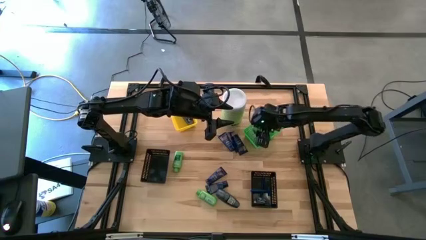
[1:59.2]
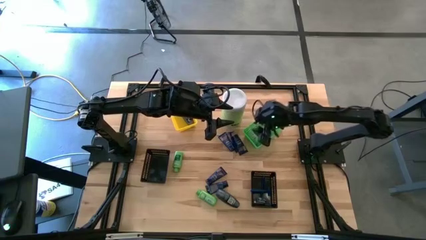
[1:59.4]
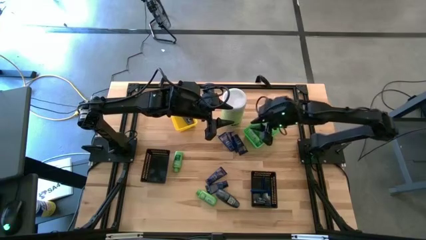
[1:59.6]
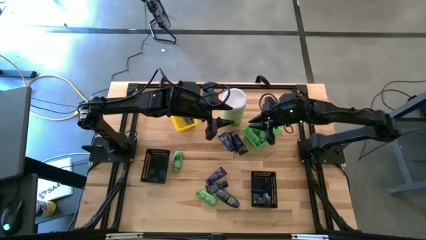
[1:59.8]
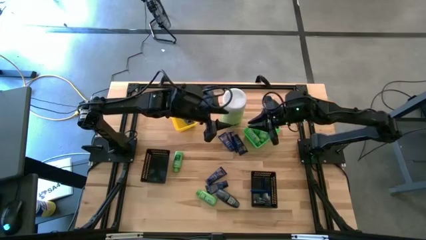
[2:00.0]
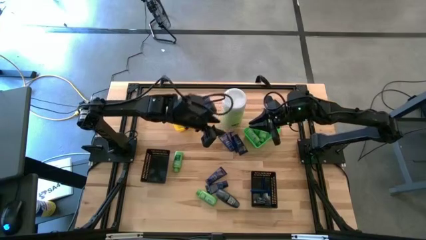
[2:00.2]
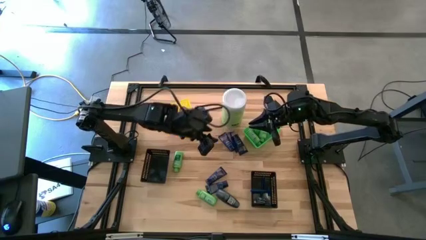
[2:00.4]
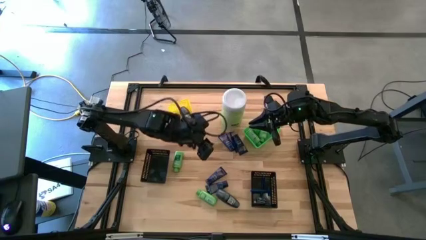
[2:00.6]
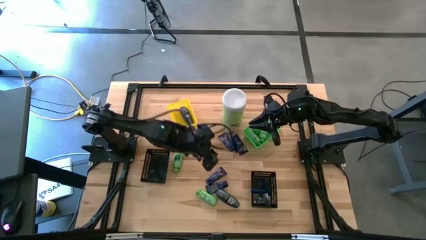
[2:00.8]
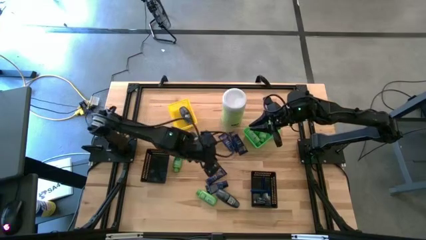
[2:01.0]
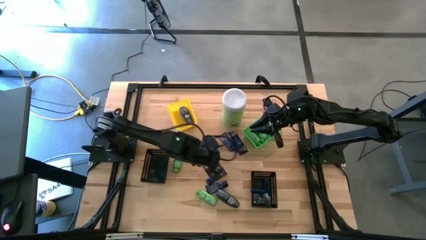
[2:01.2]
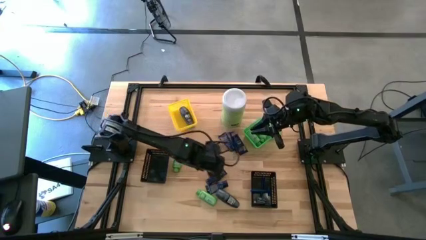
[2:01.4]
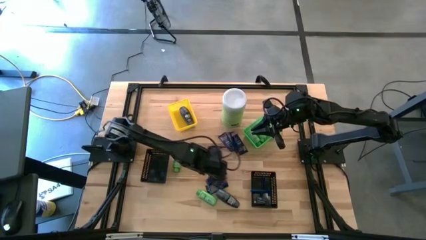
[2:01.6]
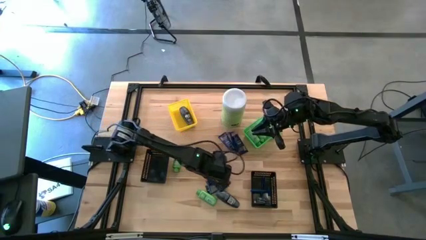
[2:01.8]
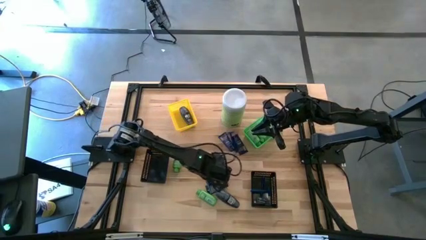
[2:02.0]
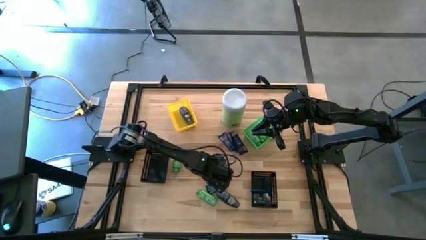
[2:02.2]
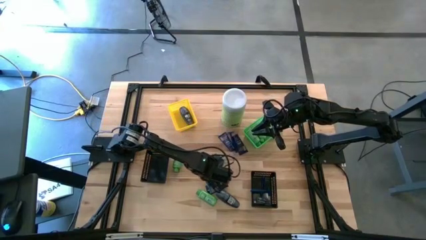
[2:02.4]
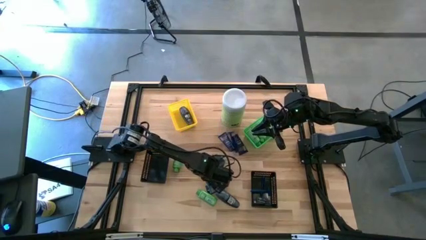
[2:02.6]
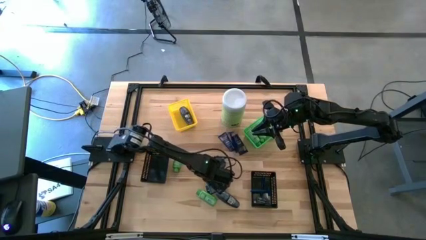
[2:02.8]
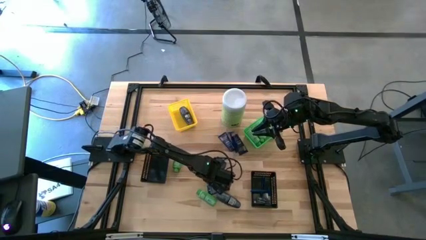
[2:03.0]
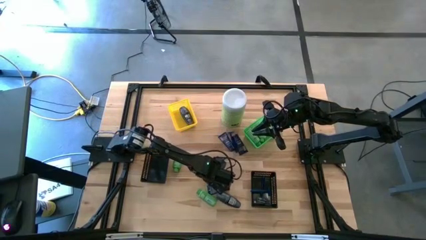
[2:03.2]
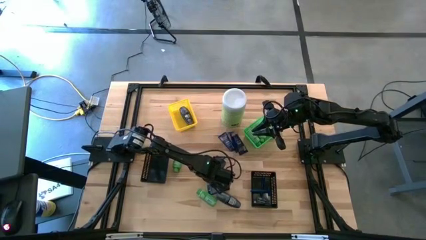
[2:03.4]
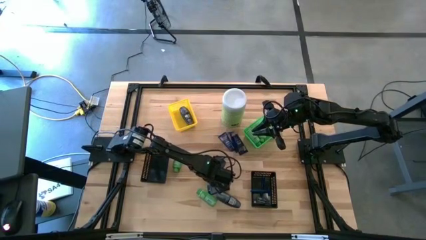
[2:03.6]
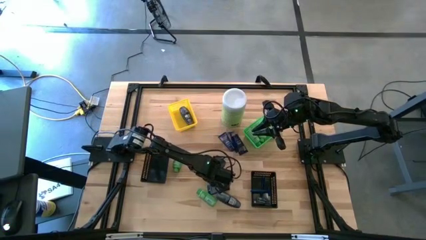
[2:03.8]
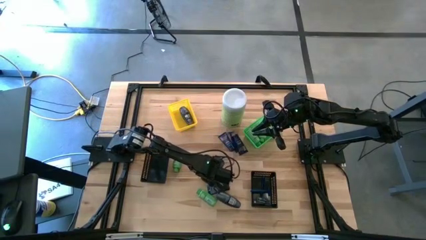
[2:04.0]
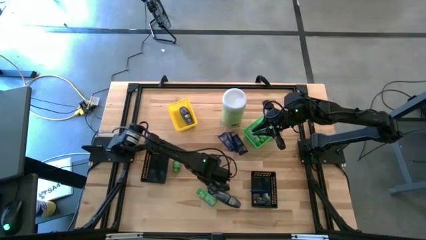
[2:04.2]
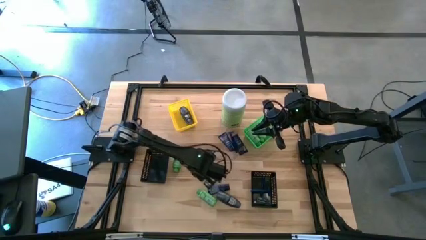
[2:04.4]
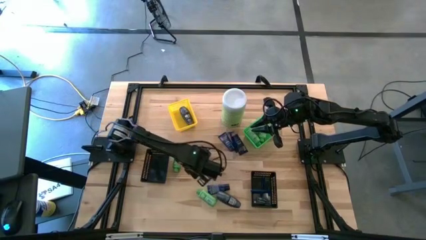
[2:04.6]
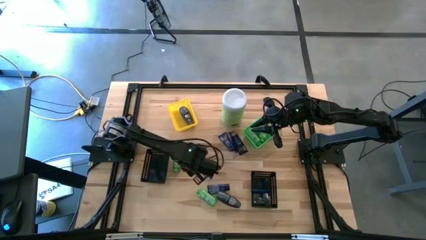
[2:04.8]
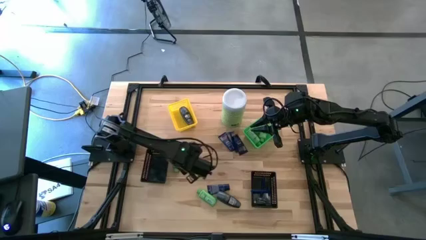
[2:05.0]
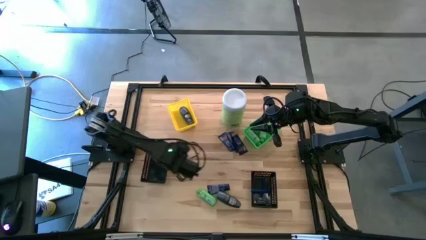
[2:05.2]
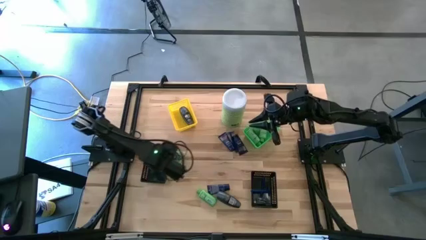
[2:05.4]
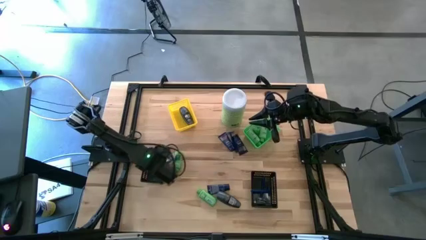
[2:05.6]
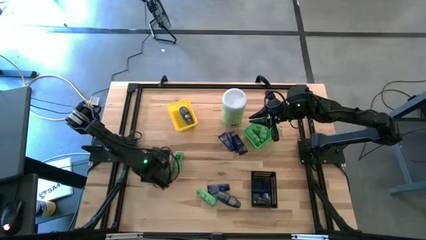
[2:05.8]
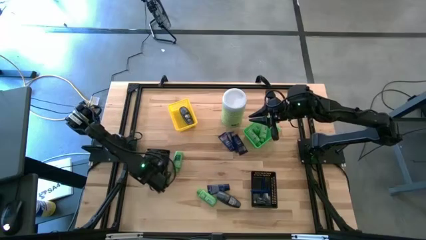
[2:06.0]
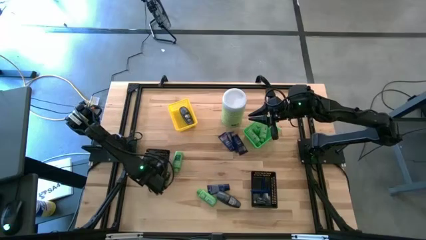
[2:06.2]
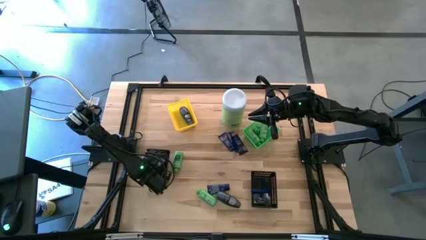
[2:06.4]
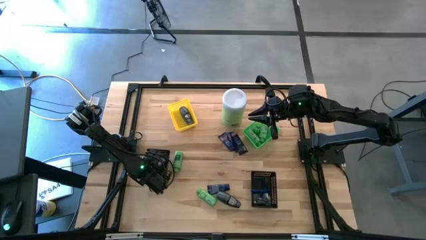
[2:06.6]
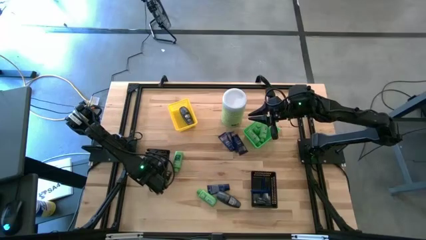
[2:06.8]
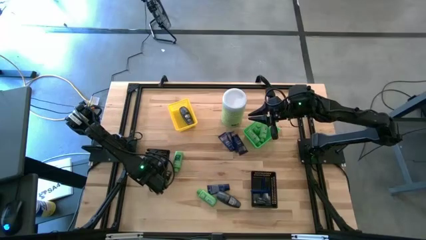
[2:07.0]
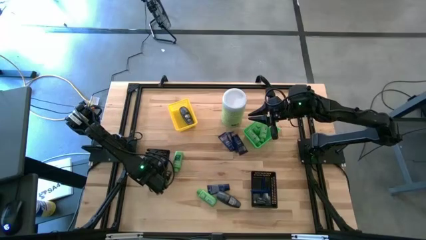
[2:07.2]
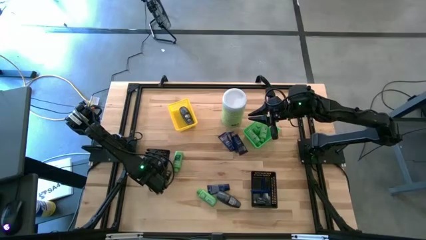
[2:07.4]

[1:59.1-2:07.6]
Task: Pick & Place Travel size toiletries
Put the shave cream into the left black bin

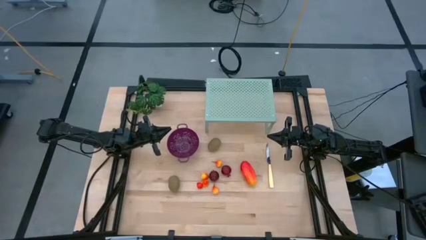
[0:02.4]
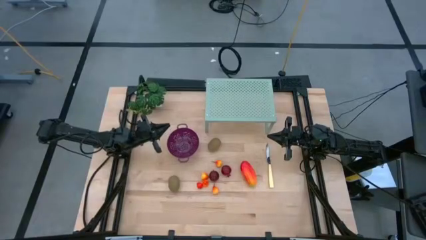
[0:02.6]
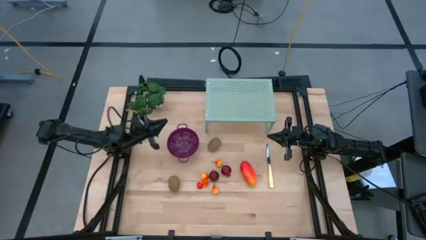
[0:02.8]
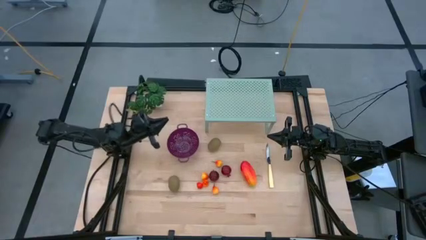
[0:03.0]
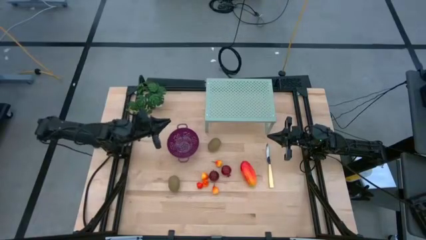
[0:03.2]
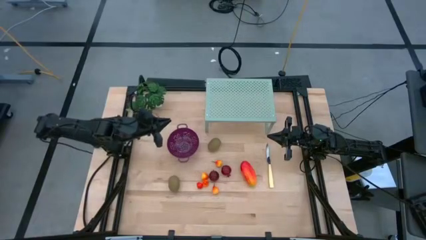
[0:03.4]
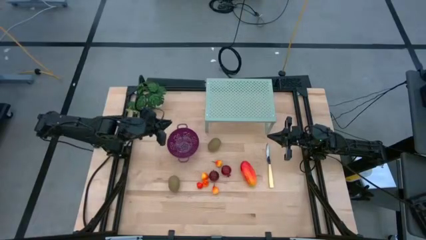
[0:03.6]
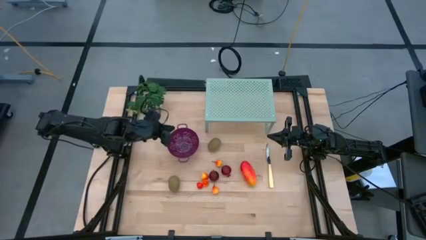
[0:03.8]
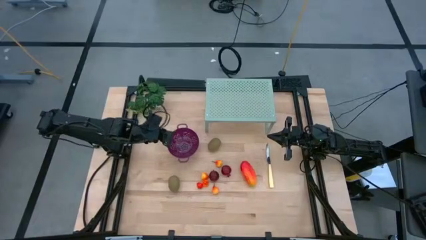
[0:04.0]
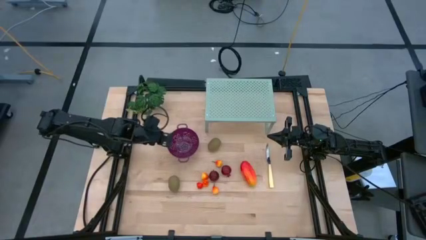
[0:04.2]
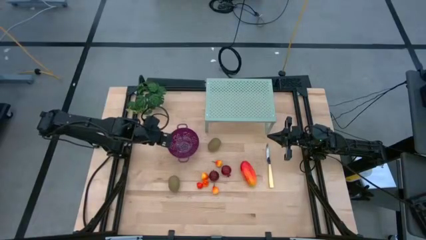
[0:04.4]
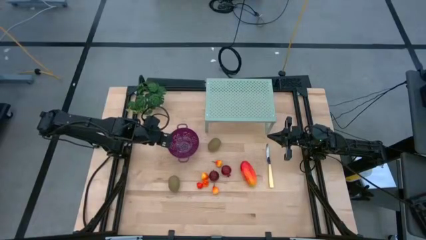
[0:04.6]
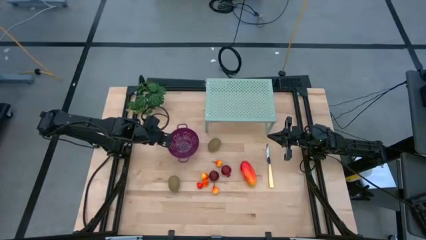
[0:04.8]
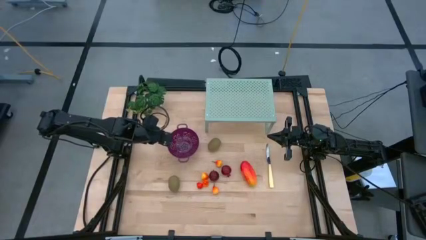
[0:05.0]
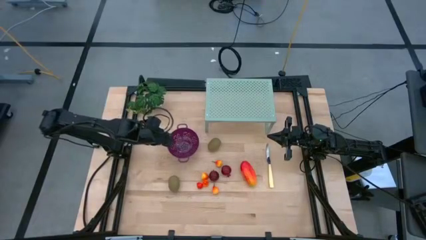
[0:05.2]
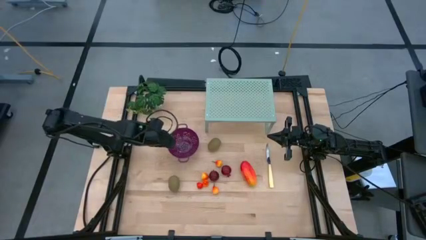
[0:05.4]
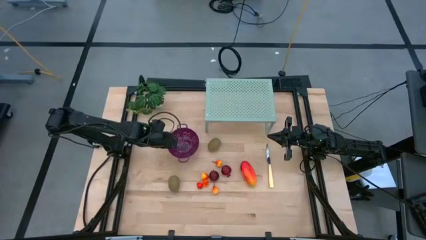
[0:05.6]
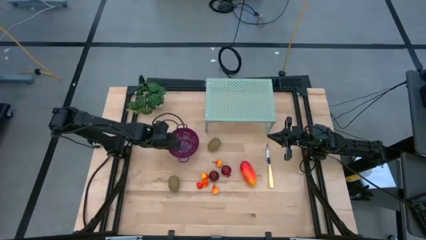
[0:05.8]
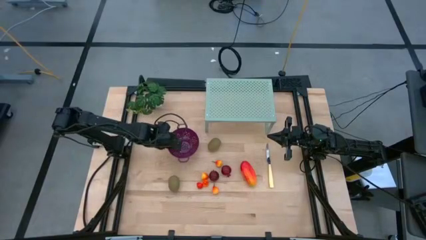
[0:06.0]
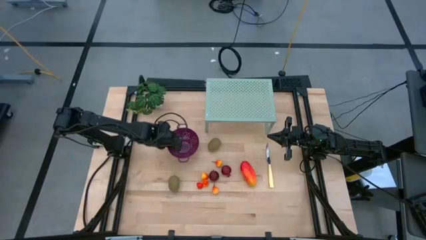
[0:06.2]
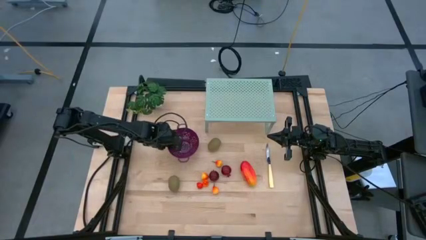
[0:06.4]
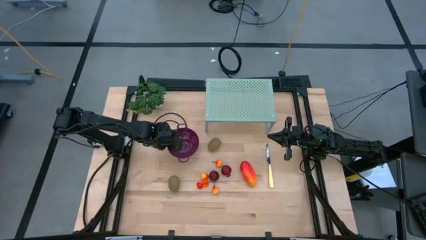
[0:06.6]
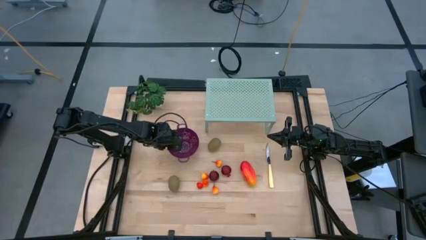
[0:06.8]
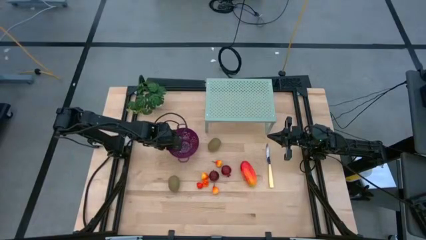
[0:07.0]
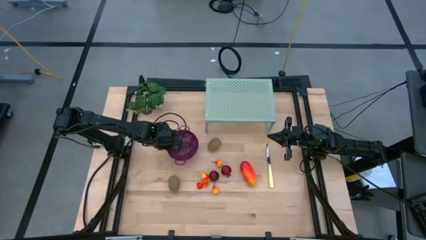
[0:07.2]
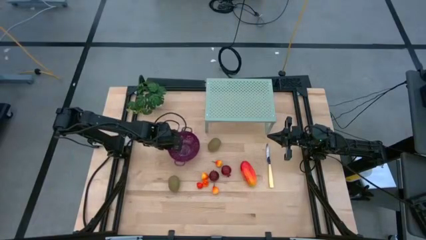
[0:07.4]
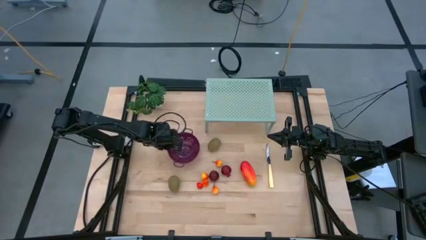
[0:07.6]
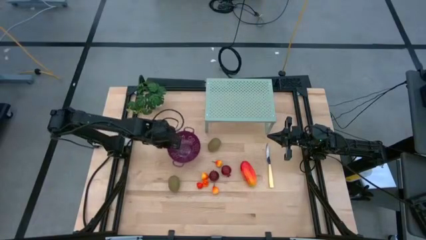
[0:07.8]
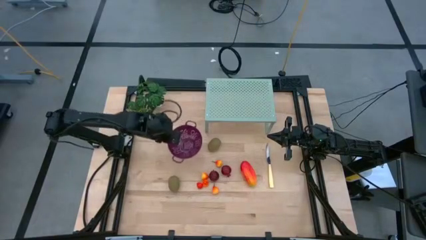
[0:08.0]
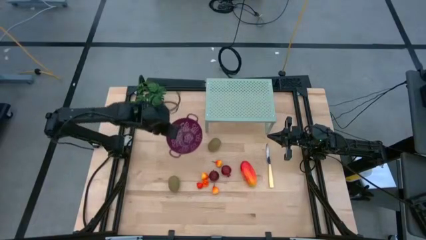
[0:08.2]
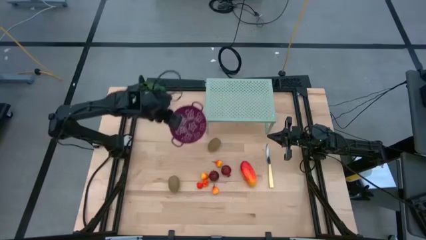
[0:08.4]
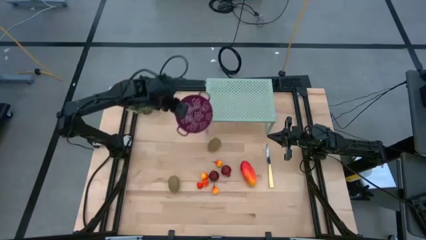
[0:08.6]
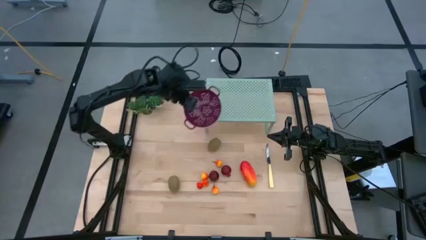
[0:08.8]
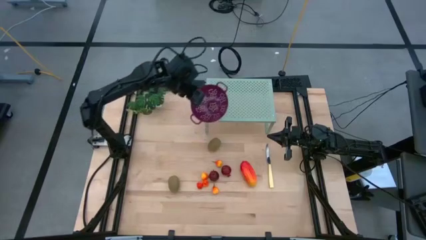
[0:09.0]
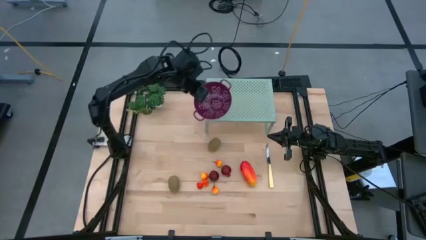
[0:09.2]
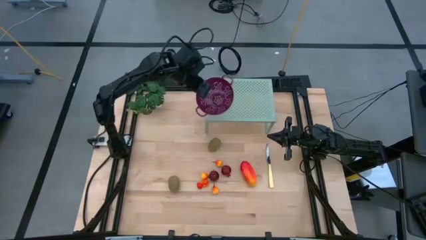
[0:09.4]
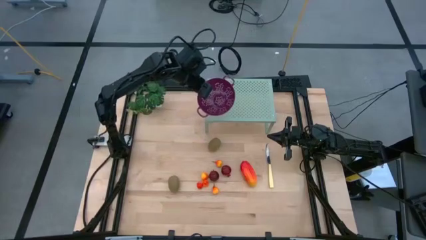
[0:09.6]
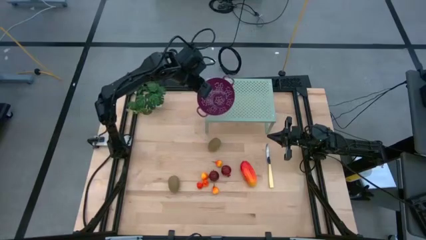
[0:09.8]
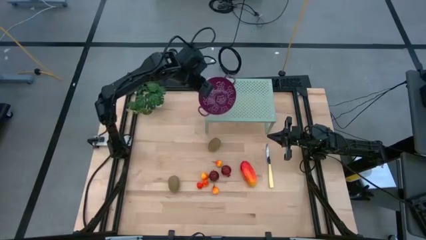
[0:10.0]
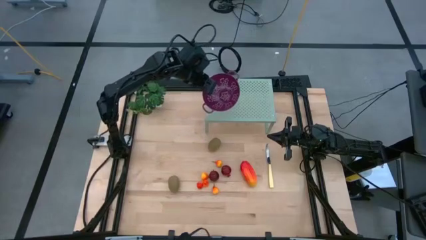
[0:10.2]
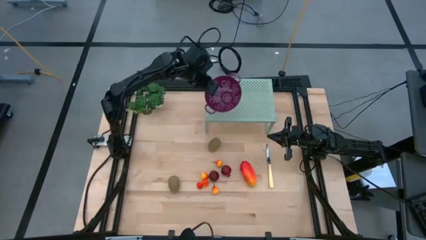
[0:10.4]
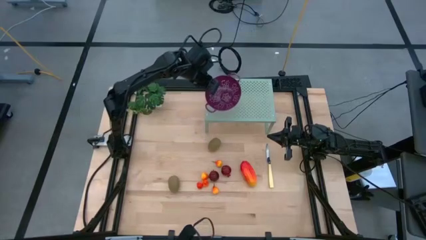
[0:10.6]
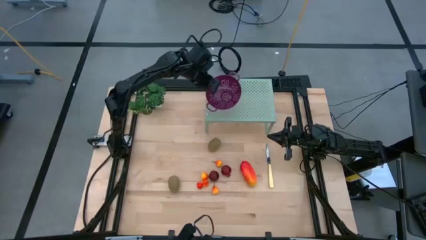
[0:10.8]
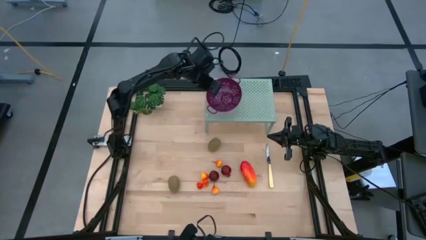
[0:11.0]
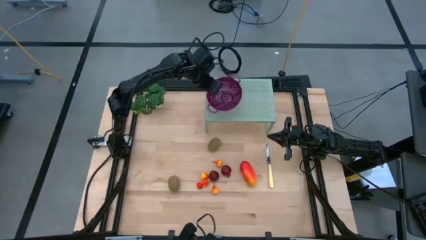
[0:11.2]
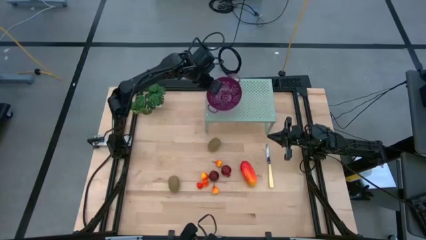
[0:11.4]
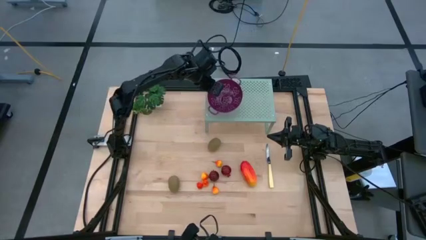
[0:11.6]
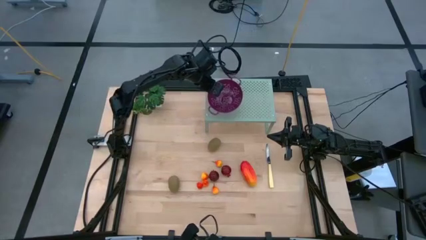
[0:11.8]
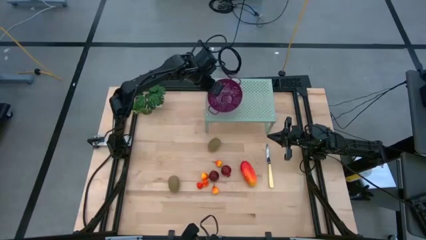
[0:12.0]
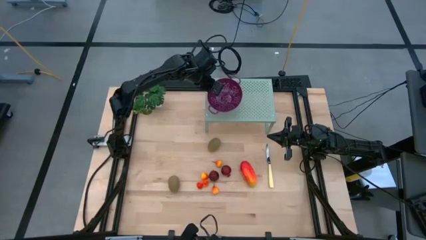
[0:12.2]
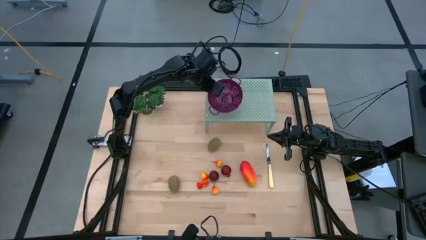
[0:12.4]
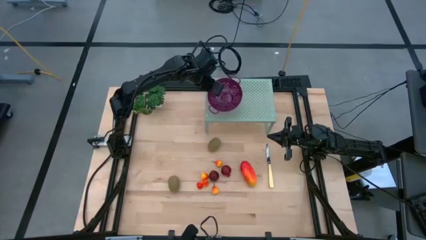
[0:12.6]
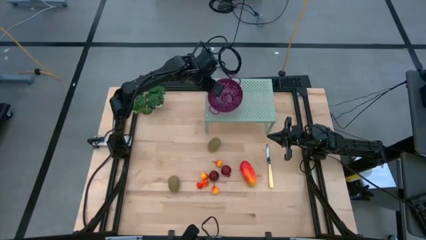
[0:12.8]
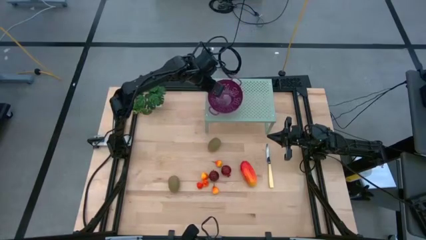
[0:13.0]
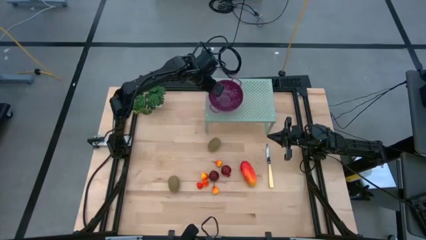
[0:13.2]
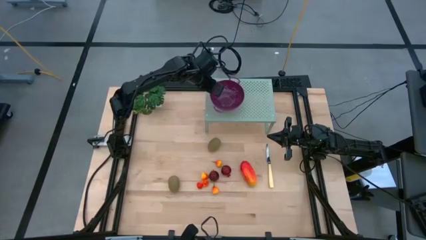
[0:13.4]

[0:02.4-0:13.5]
Task: Pick & Place Fruit
Put the dark red colander on the shelf
